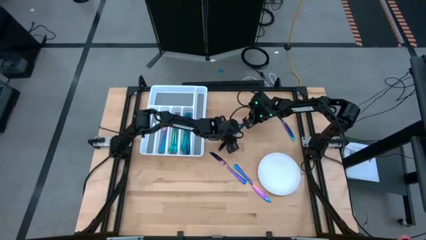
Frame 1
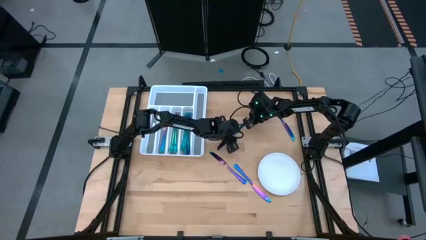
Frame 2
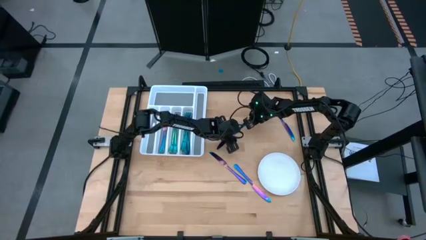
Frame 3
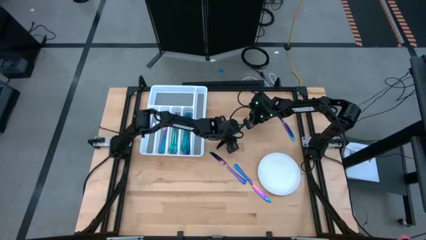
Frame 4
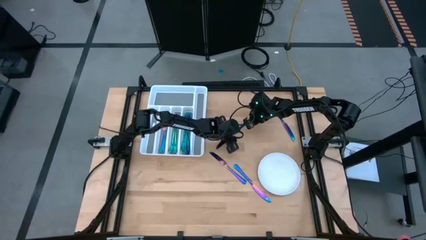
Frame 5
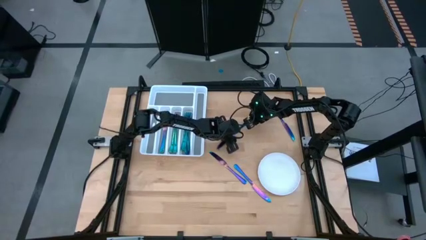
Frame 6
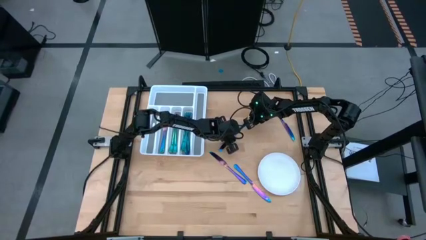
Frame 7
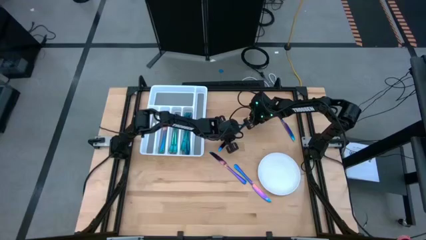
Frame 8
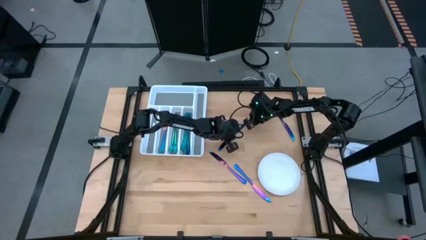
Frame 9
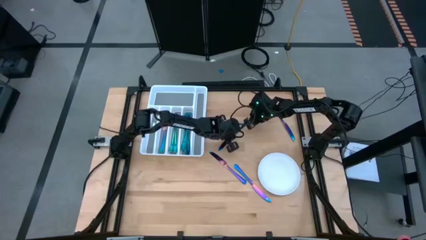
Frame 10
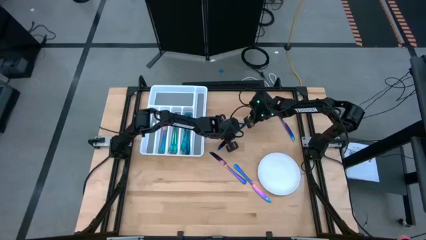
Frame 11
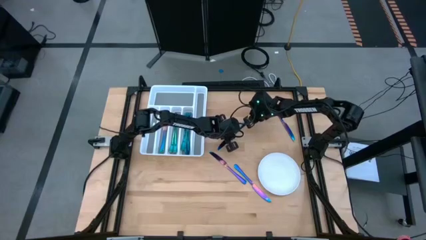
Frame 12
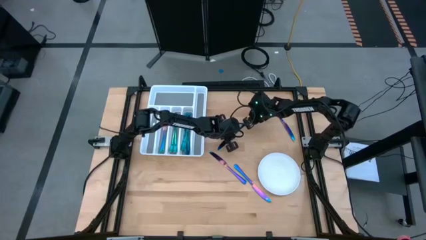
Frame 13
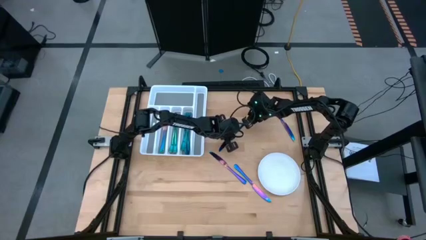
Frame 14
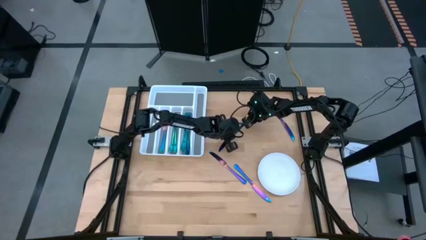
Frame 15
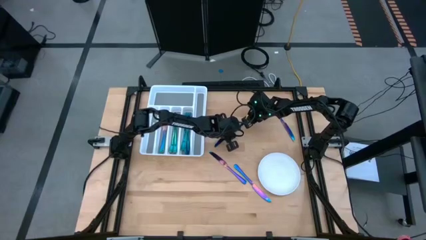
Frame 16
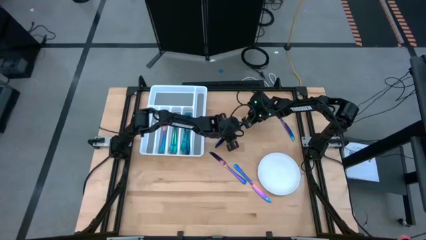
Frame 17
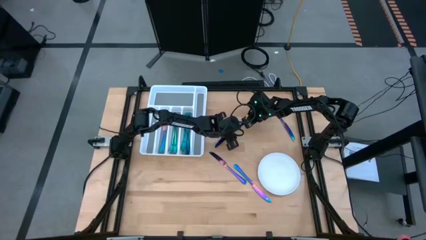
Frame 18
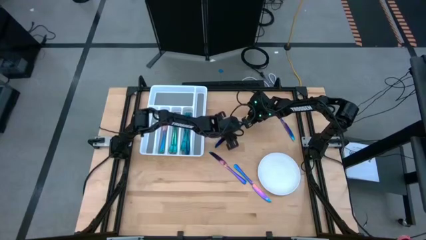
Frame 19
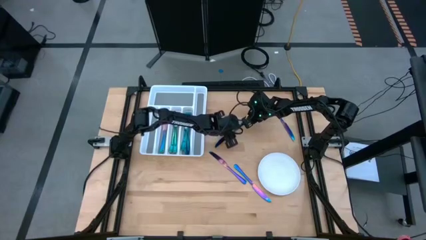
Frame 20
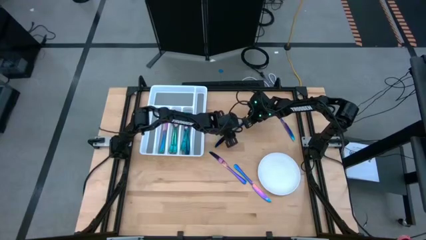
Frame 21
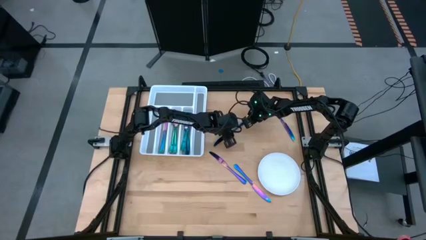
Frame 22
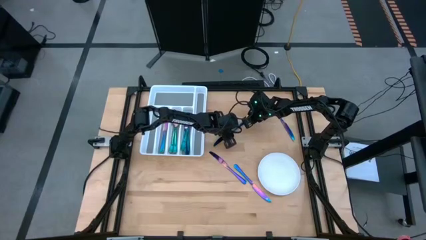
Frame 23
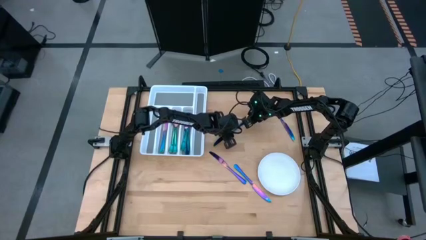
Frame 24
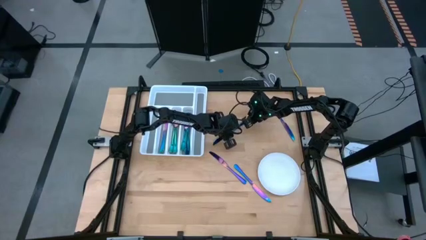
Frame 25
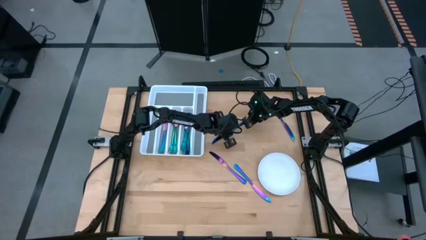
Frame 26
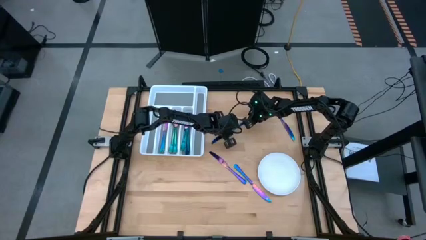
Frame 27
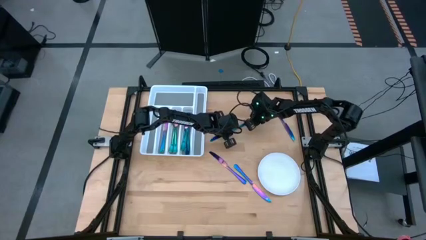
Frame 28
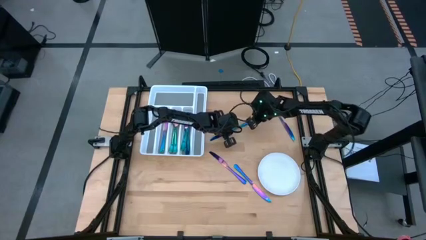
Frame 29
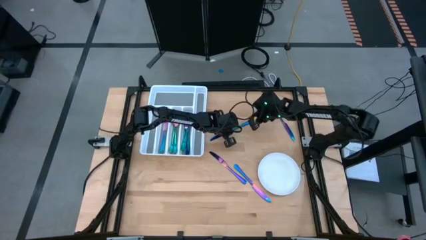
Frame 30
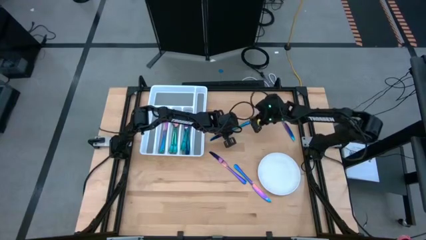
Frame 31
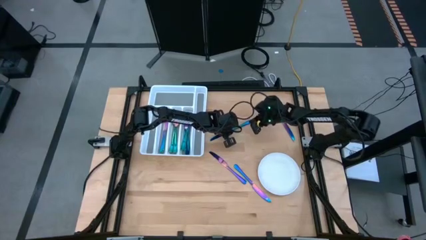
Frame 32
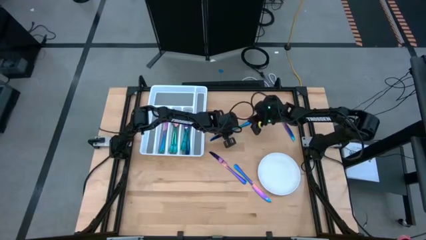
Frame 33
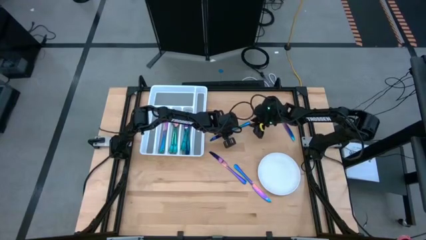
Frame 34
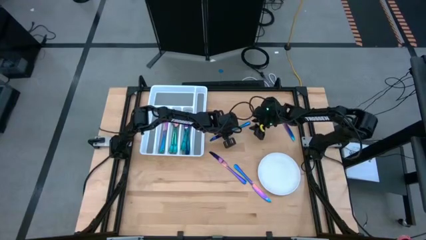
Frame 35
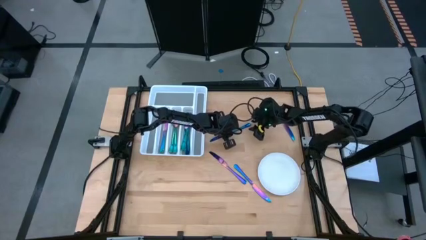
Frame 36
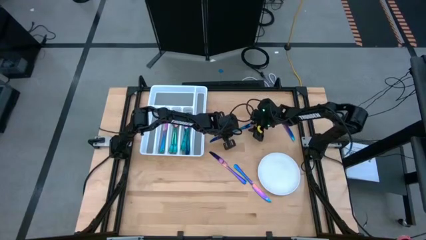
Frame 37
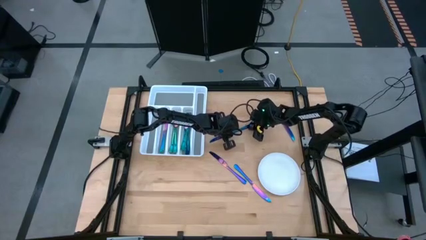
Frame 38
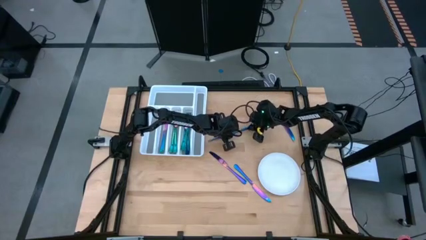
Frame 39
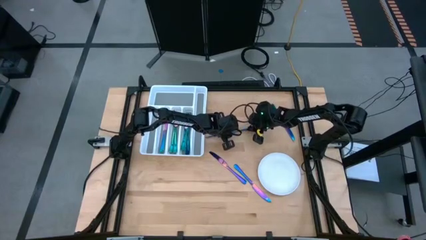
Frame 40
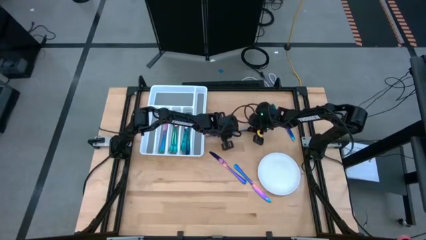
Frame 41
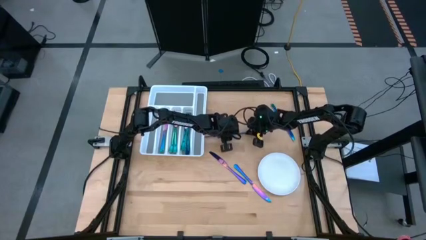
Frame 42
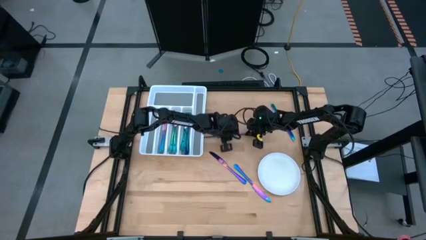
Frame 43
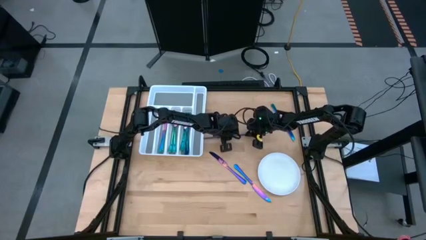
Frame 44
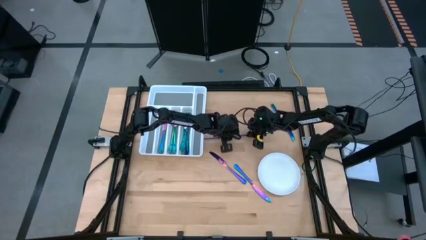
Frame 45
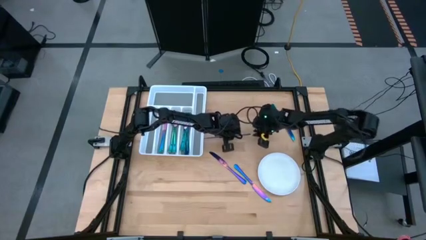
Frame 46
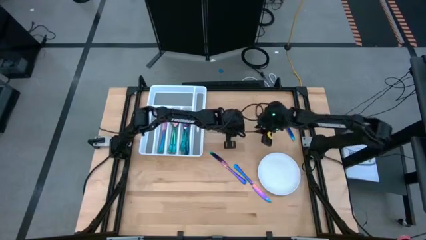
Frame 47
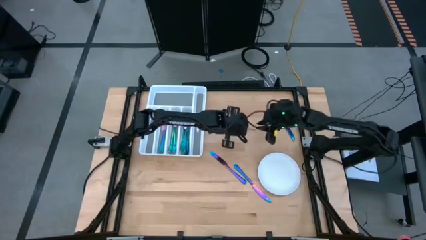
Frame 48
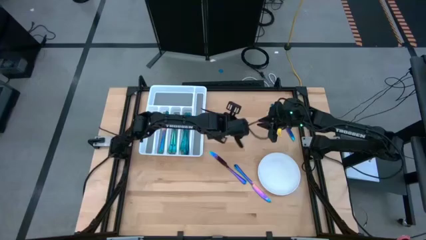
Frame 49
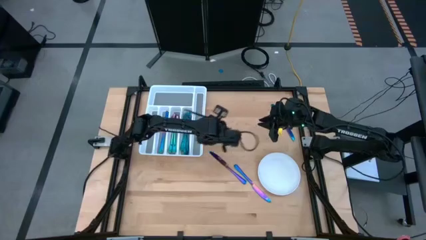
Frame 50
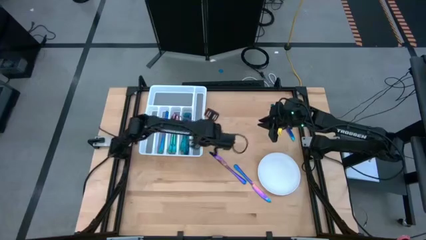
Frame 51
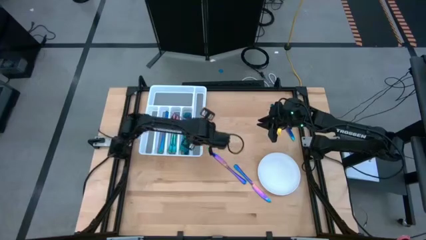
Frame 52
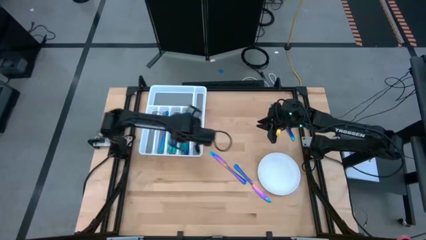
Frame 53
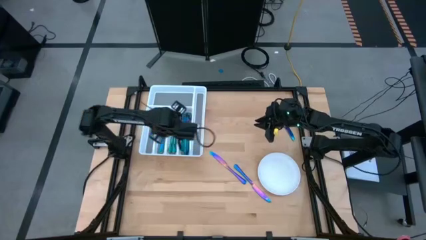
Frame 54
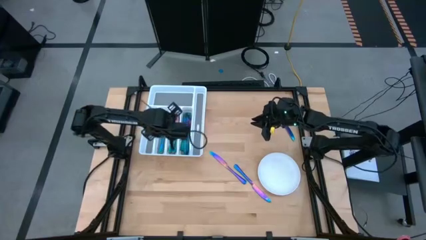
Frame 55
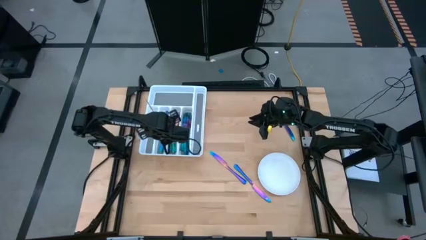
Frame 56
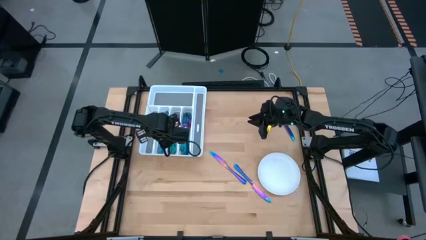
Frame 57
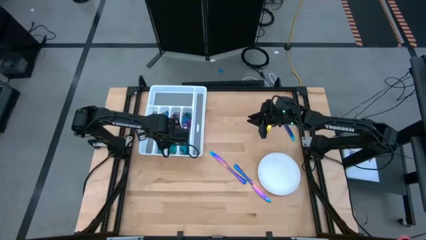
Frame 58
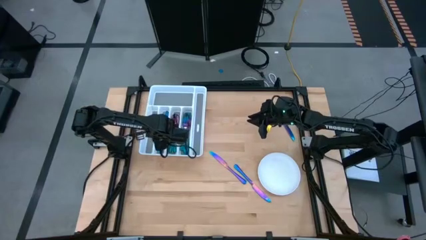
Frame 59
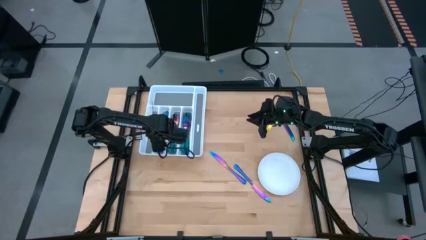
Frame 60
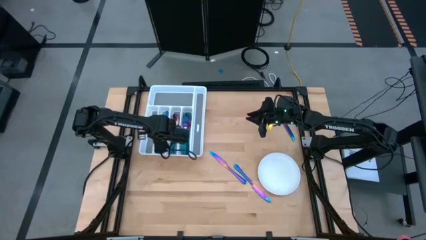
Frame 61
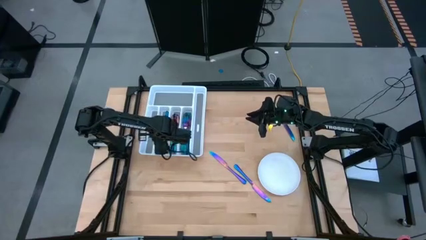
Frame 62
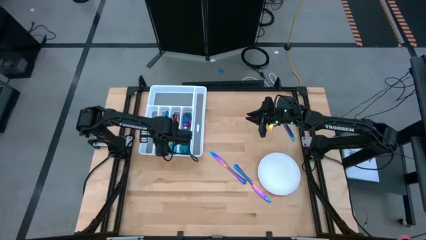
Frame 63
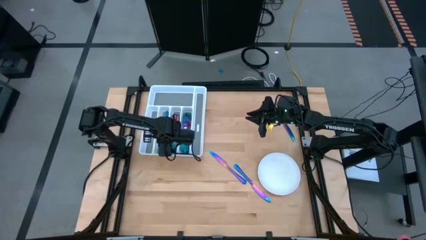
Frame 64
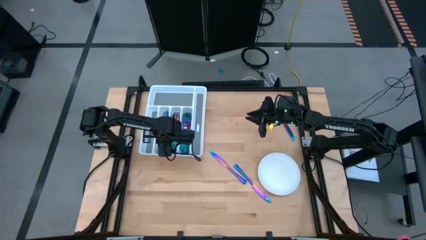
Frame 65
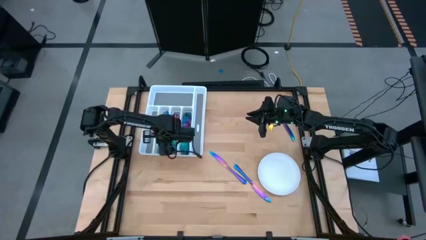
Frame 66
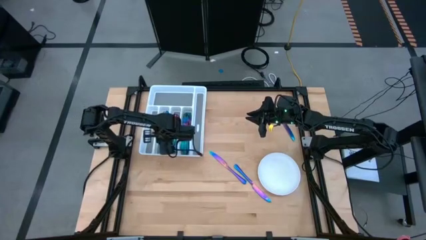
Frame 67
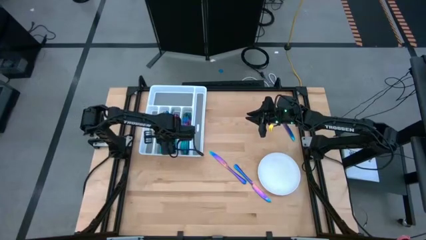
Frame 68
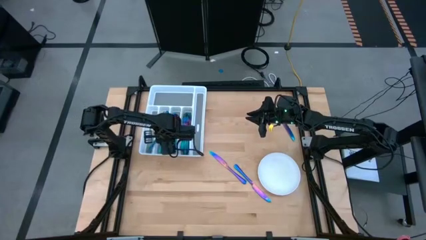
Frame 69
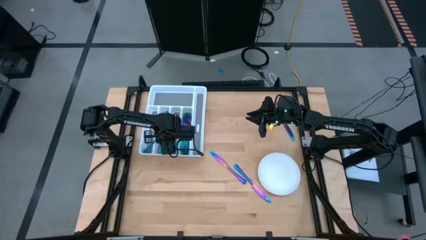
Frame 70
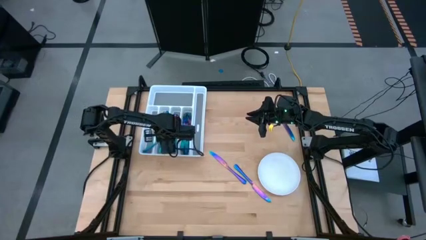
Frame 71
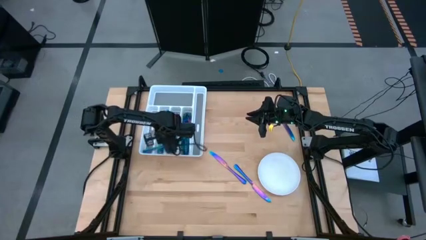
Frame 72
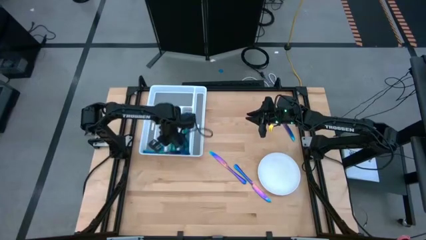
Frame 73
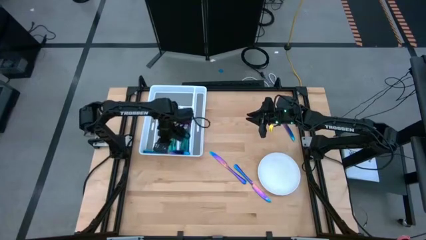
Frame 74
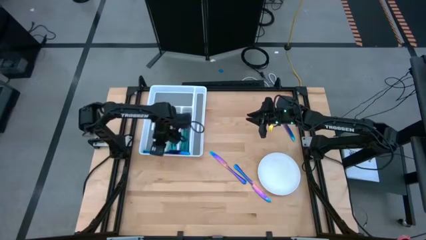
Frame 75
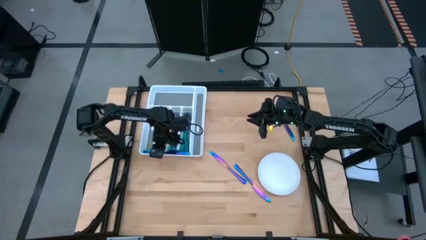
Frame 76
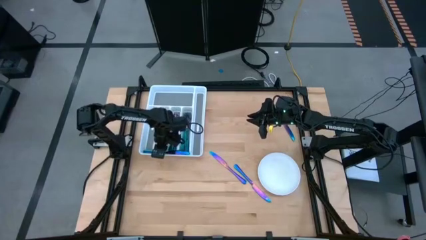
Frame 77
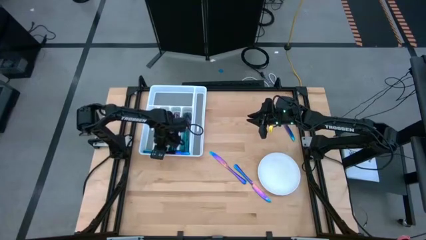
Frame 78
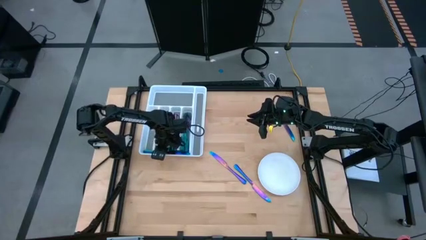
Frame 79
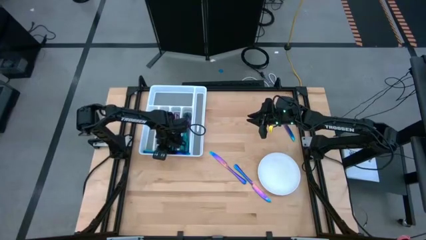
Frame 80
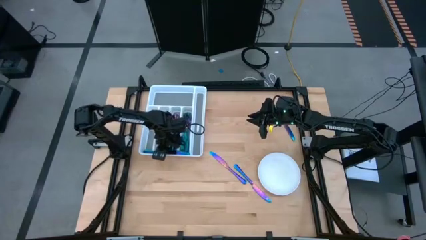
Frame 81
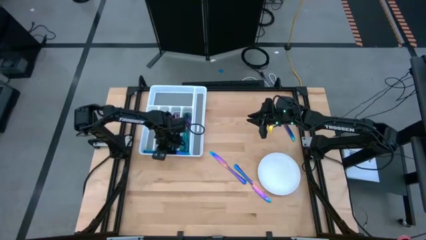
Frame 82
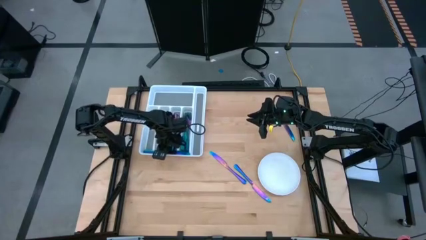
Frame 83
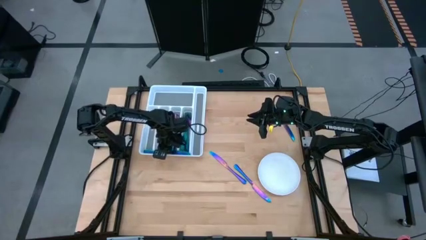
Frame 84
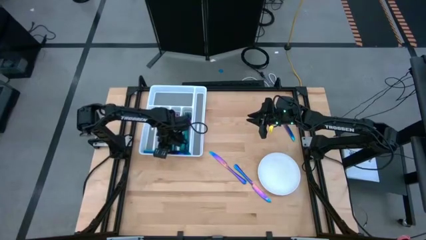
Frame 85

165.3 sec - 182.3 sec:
Task: Sort silverware
Put the iridescent knife into the white silverware tray
